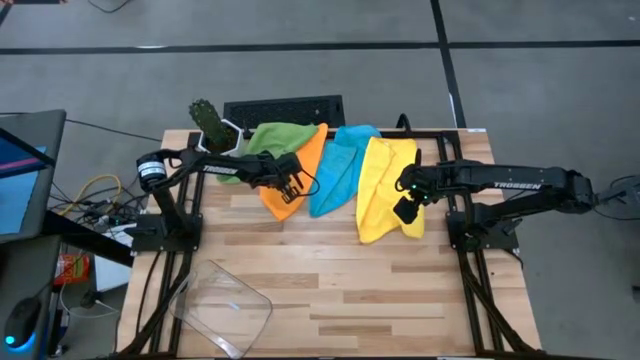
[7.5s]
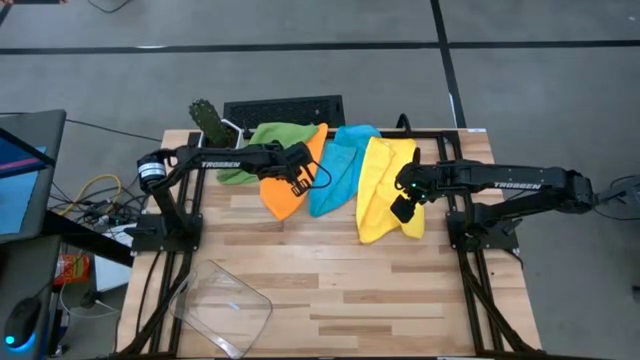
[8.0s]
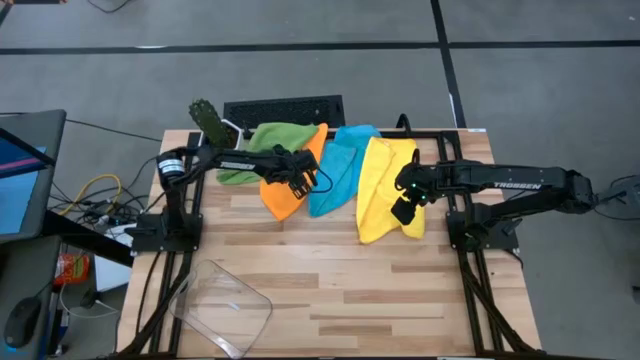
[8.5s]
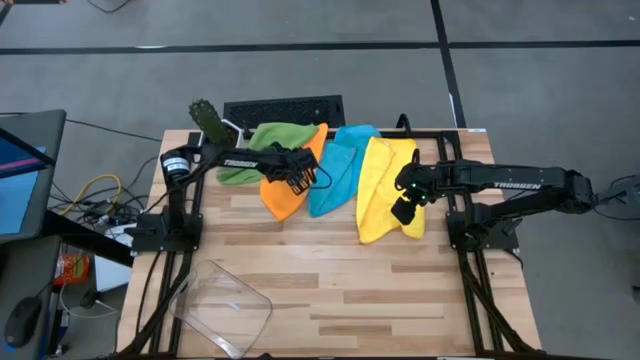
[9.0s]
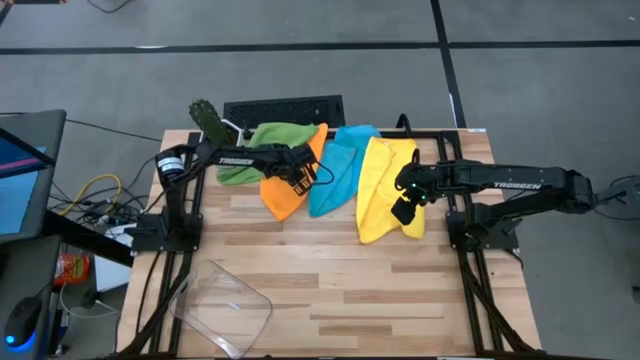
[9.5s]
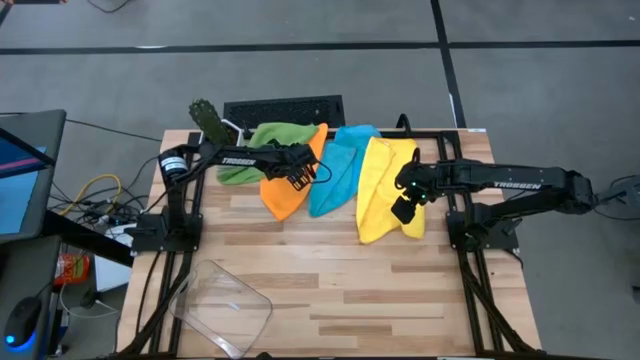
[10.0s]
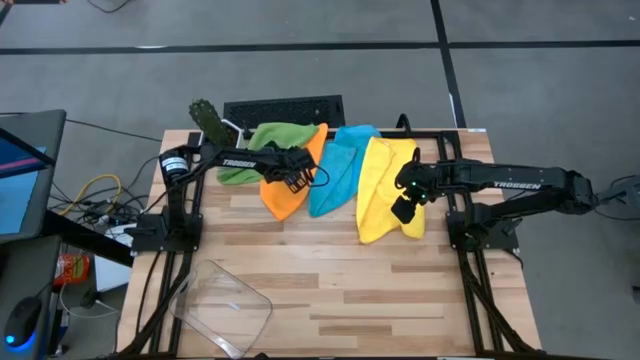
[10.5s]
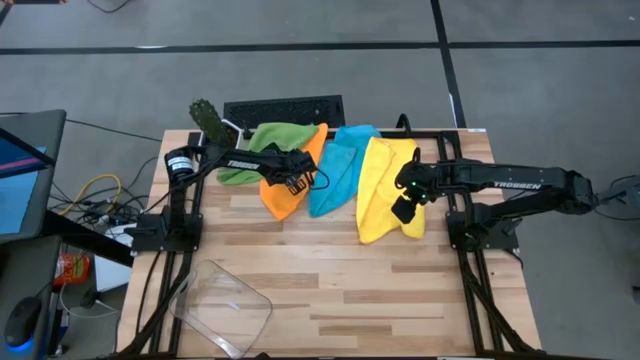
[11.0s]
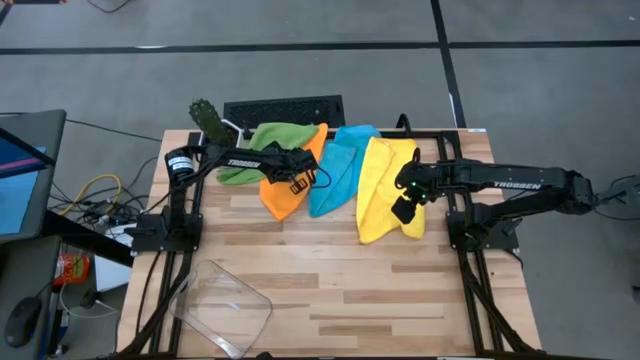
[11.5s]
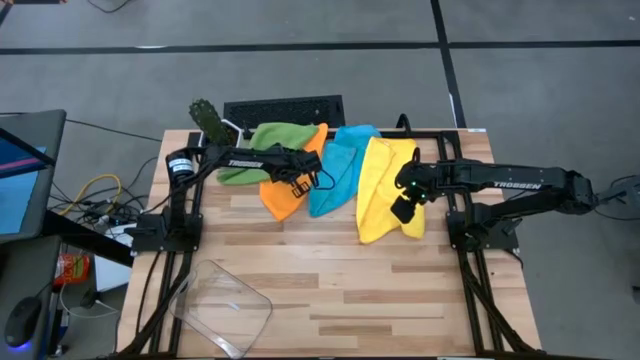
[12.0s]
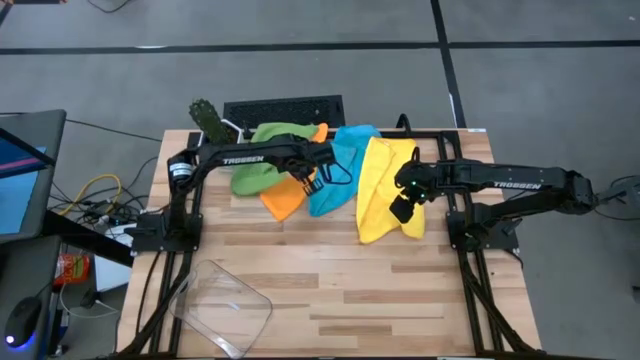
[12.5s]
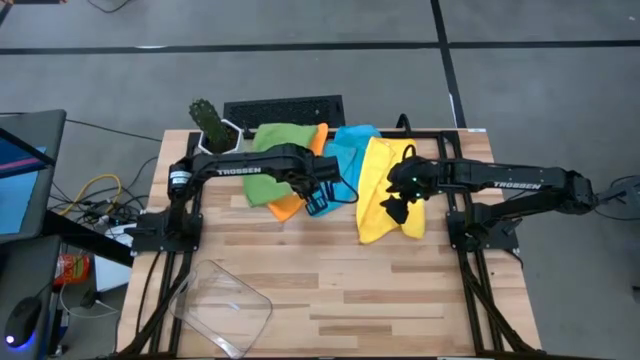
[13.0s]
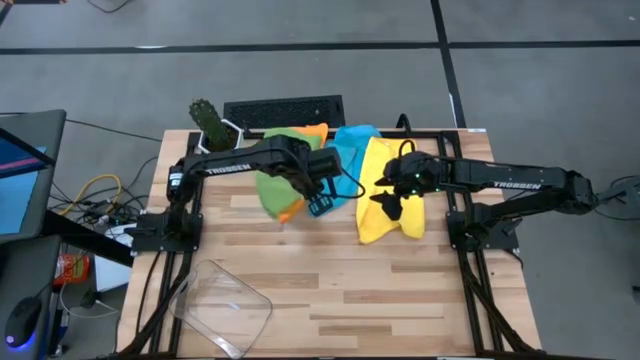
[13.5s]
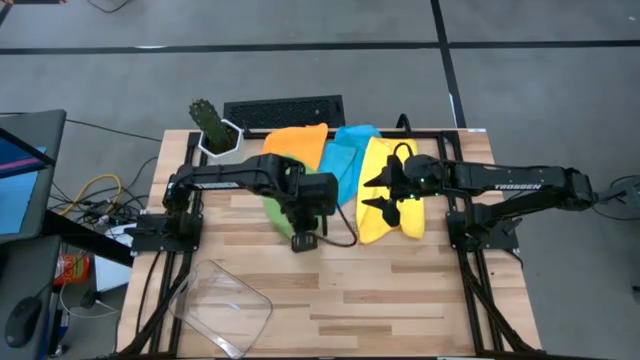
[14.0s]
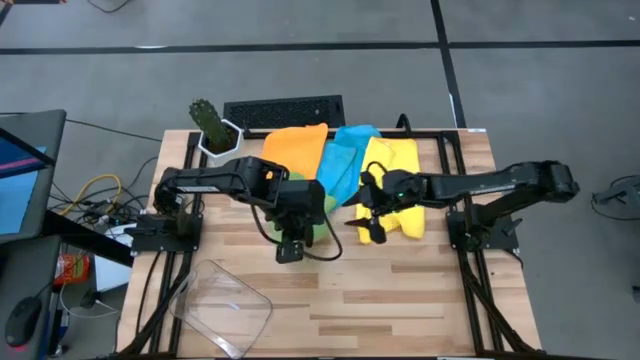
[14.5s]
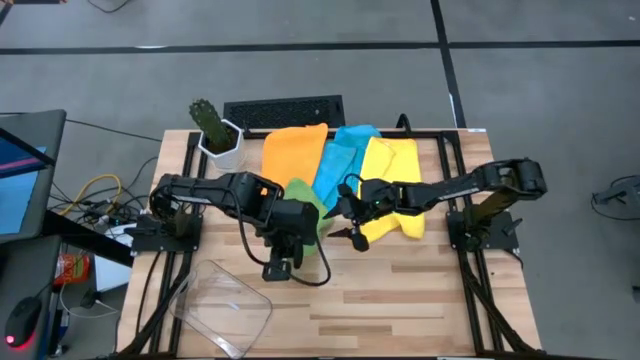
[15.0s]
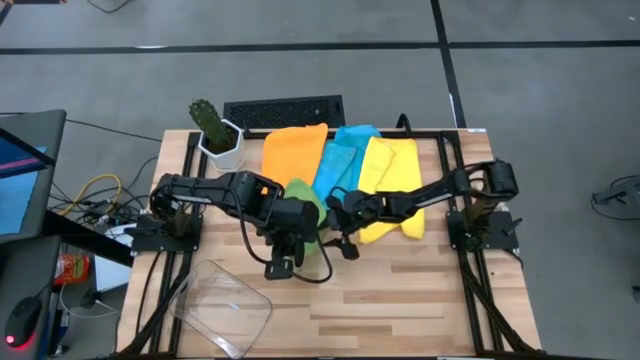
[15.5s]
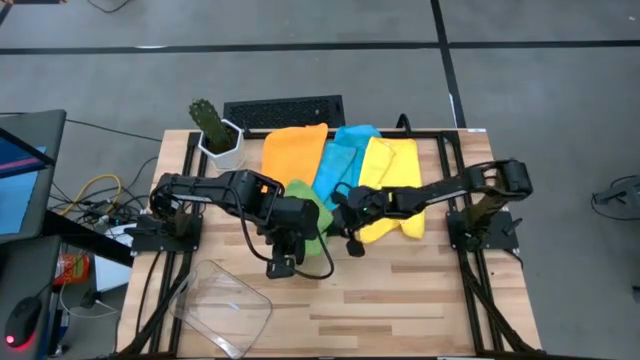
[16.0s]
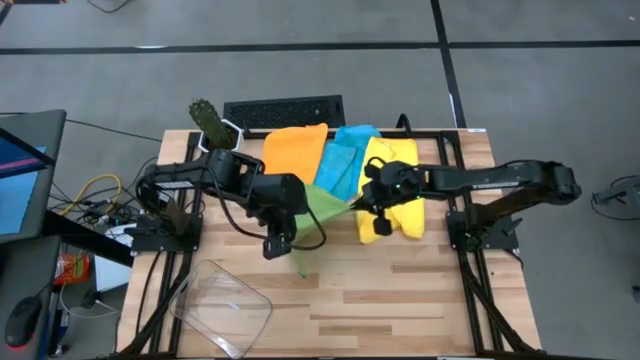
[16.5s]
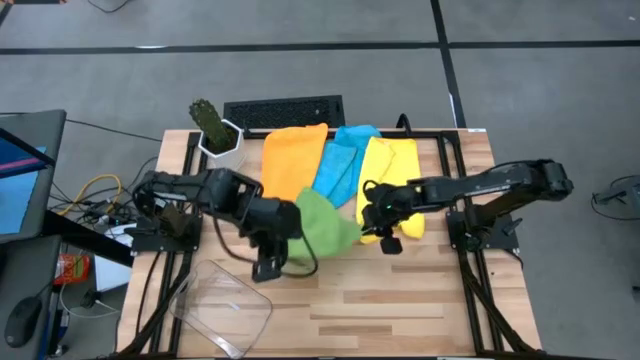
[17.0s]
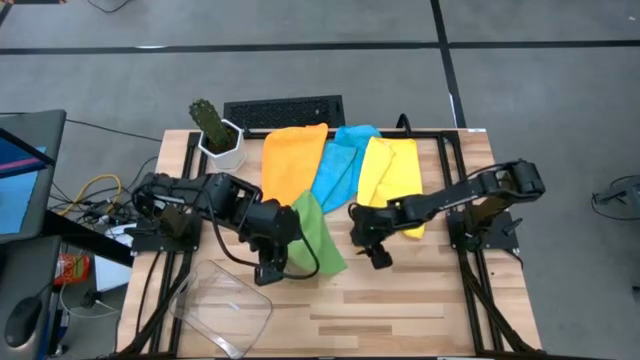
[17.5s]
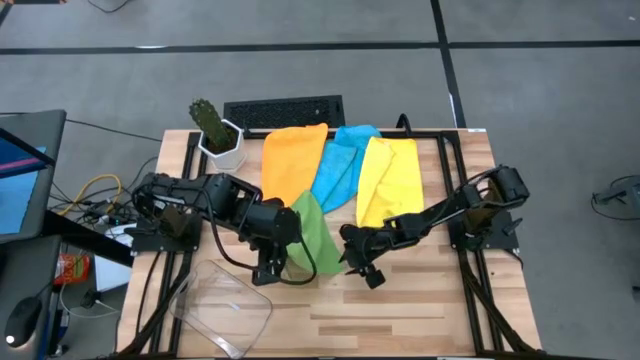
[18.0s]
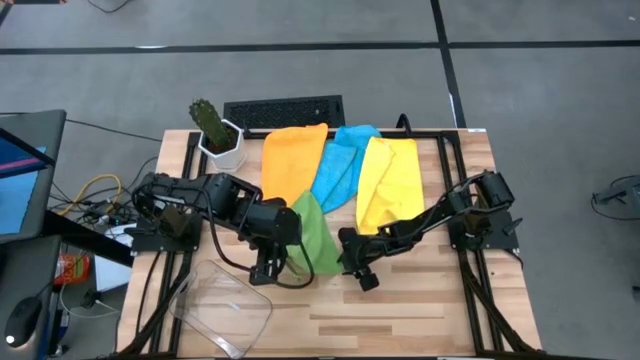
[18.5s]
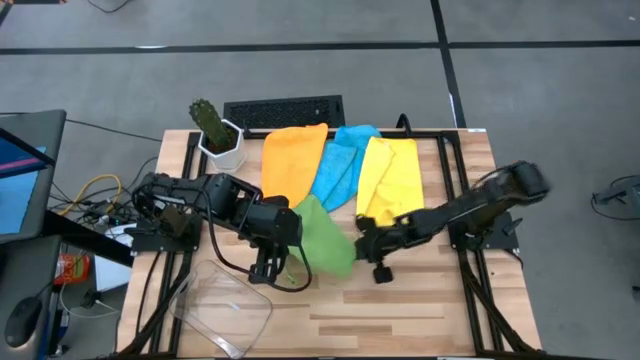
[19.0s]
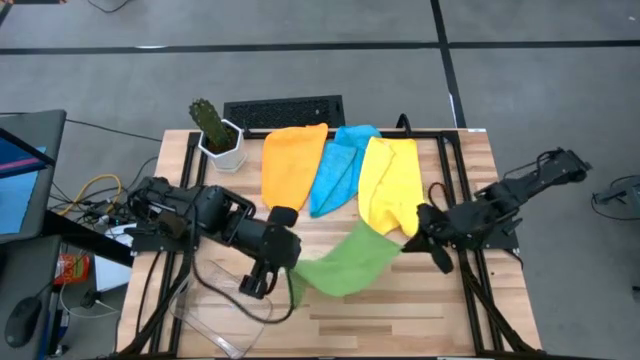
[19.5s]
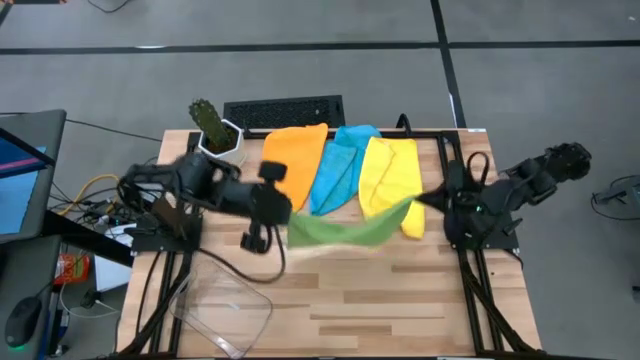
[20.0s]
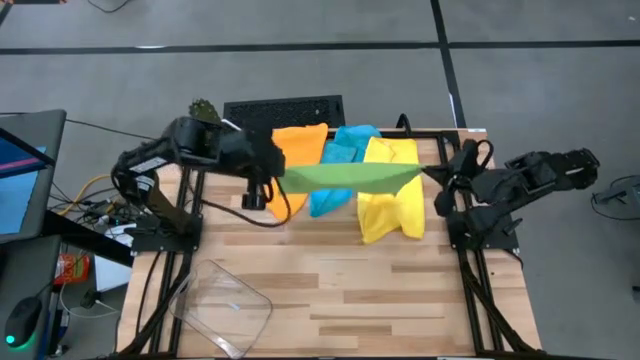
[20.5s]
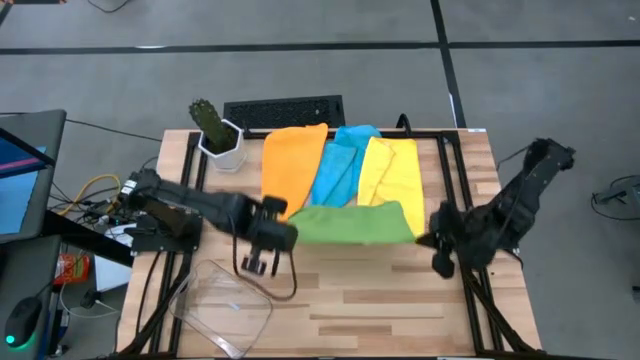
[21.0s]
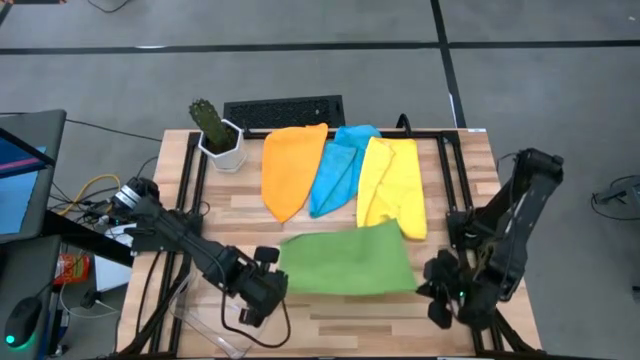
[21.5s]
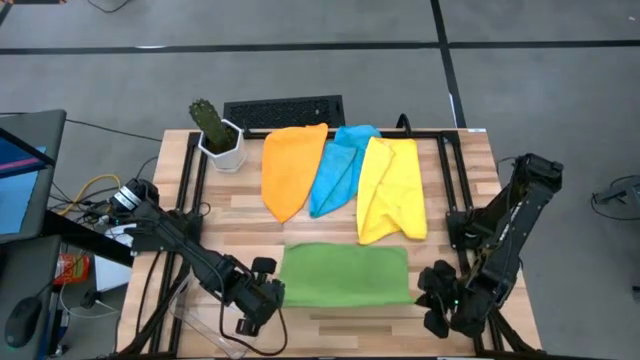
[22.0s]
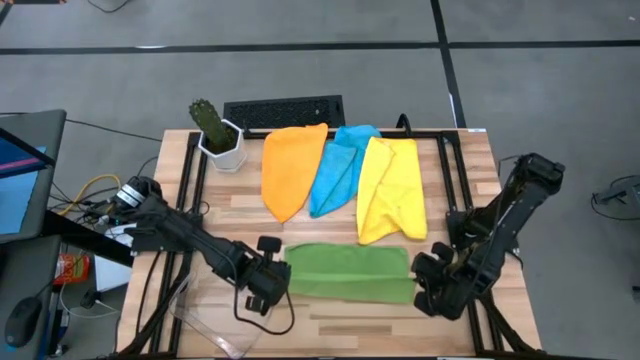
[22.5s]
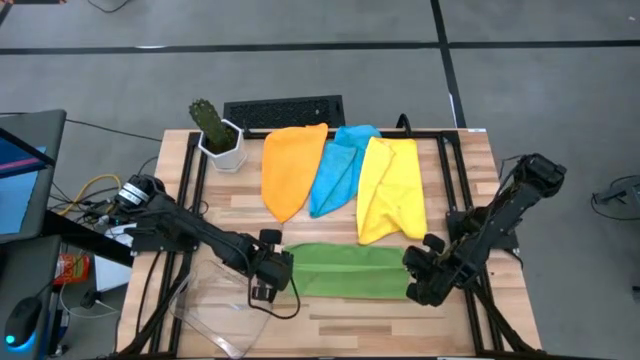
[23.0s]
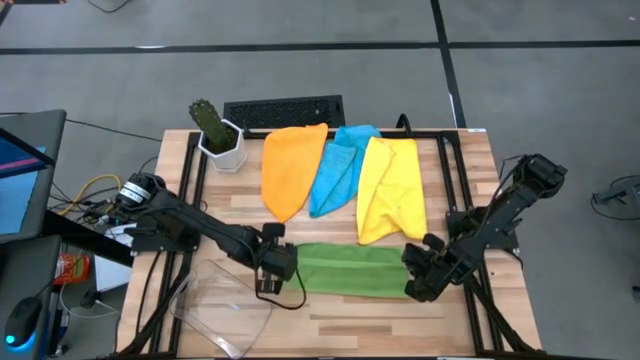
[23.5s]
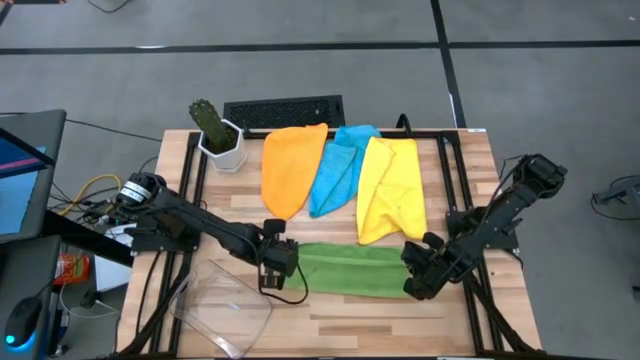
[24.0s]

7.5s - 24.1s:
Task: Fold microfiber towels
Fold the green microfiber towel

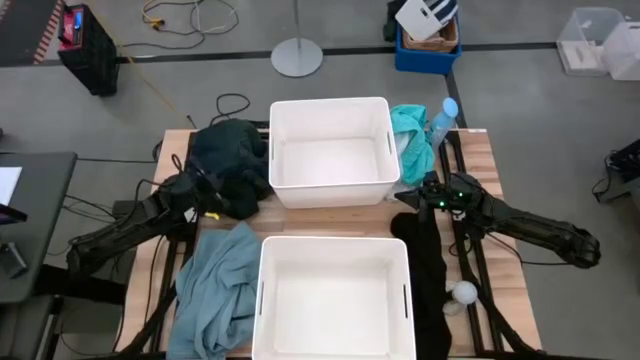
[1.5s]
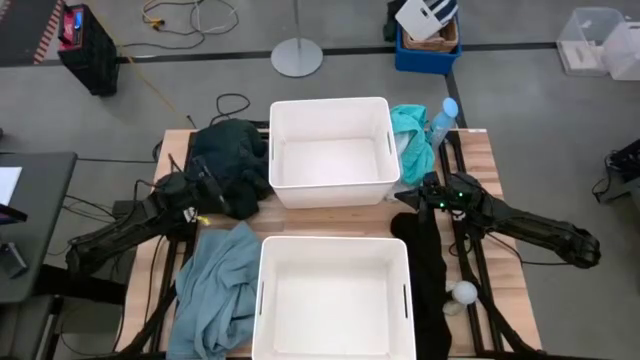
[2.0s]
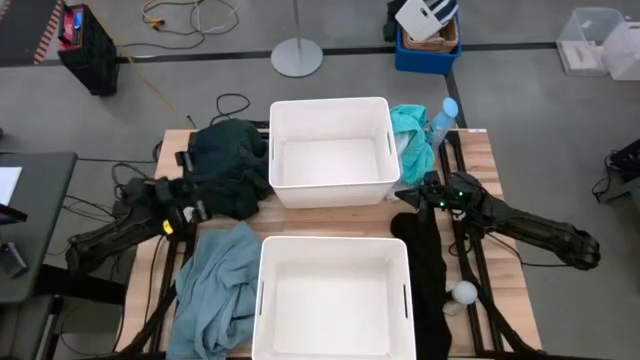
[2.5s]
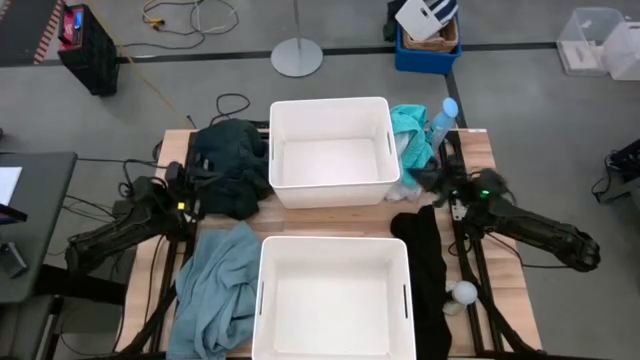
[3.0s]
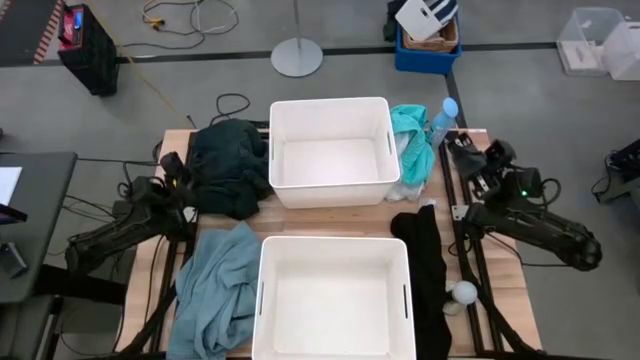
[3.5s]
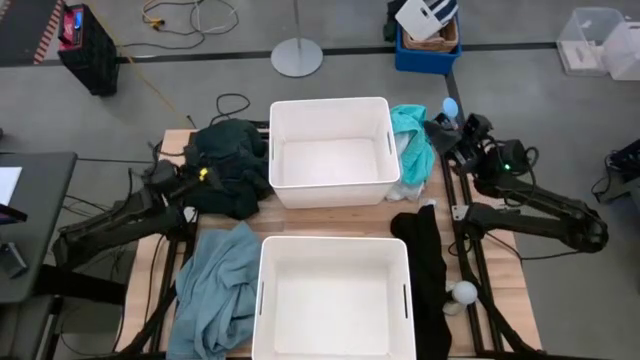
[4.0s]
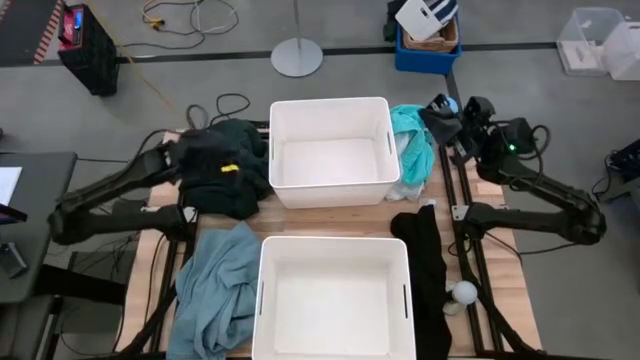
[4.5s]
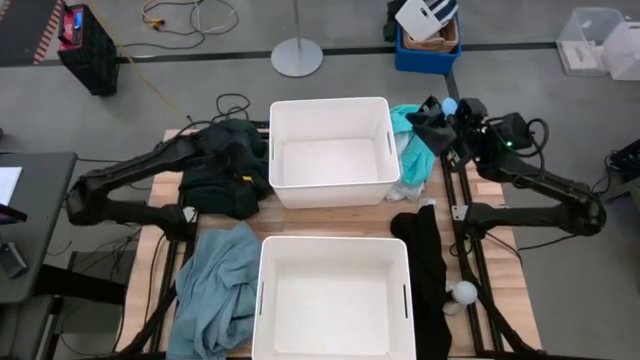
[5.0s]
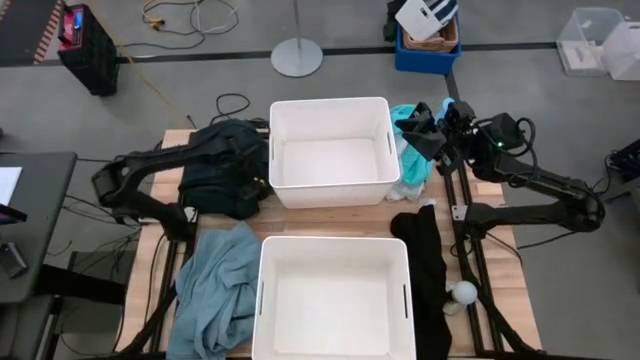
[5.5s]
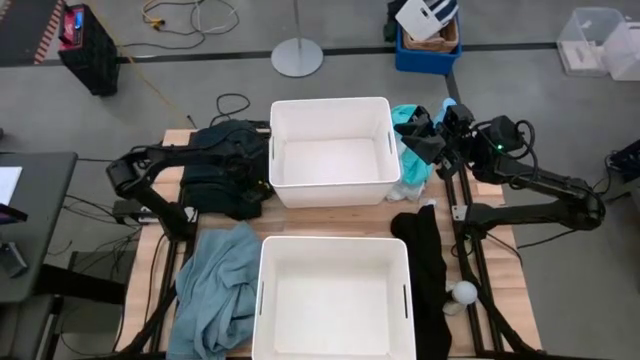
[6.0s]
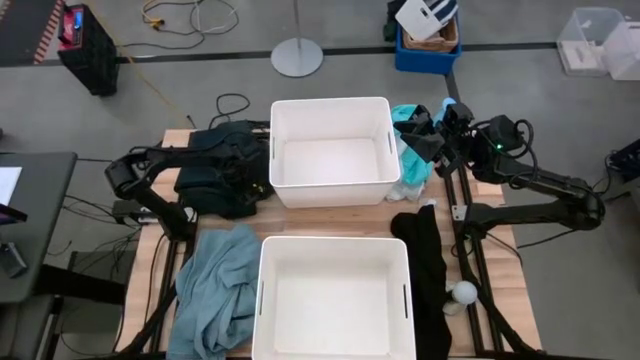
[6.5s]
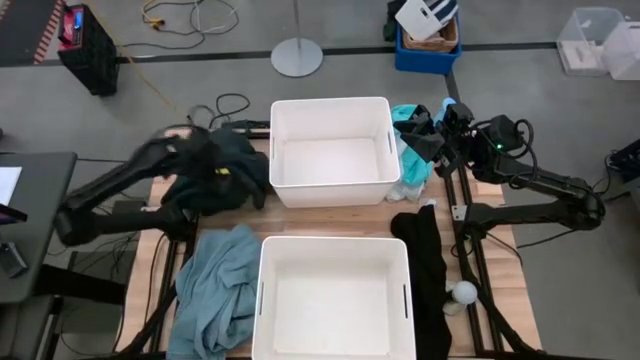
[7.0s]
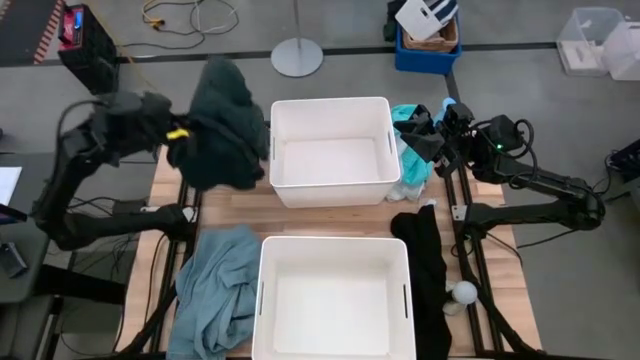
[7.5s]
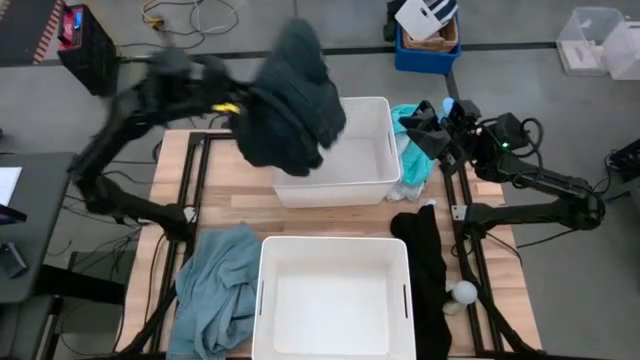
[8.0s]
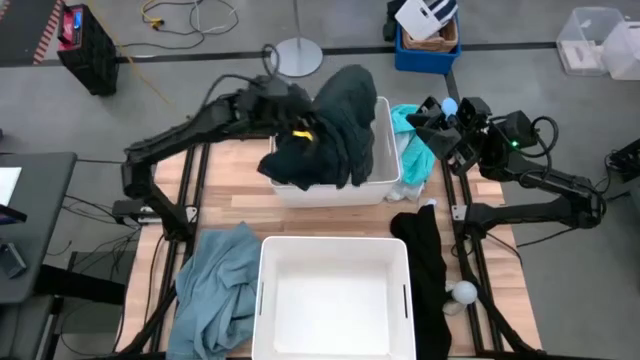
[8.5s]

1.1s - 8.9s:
Task: Sort clothes
Put the dark blue pants into the top white bin
